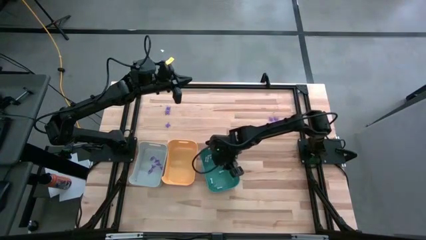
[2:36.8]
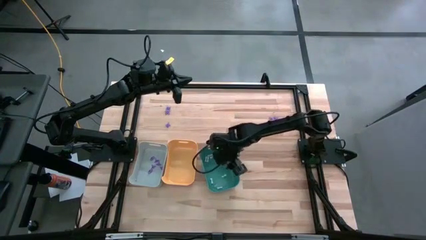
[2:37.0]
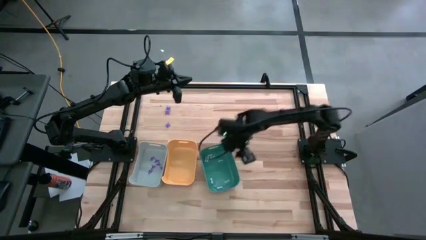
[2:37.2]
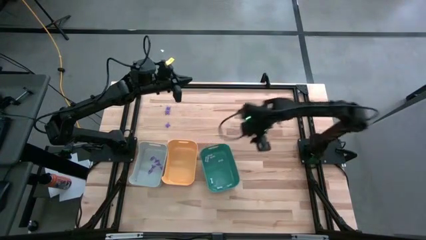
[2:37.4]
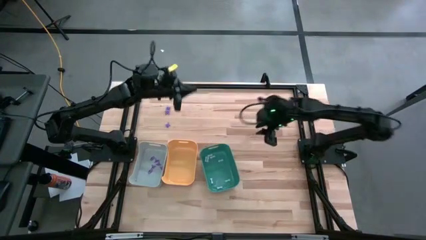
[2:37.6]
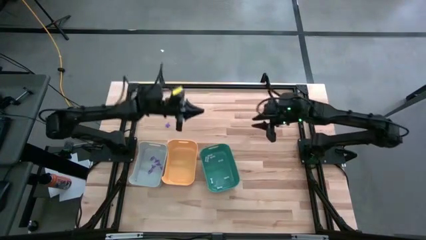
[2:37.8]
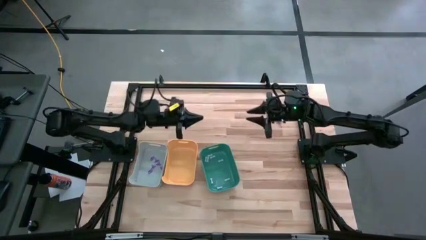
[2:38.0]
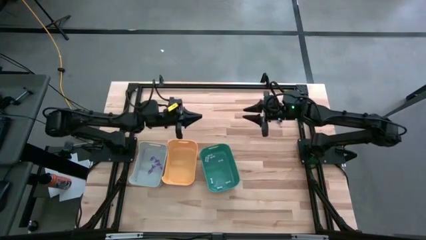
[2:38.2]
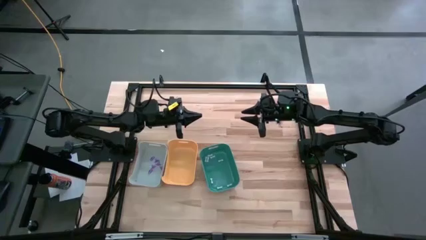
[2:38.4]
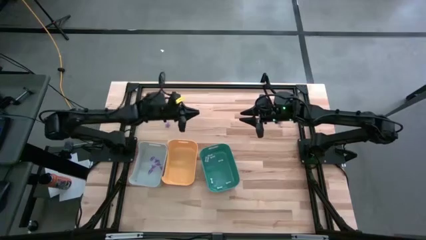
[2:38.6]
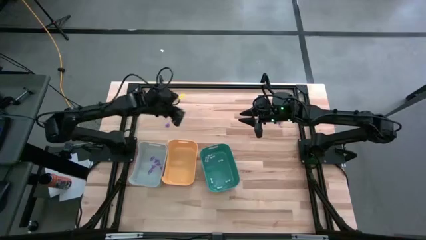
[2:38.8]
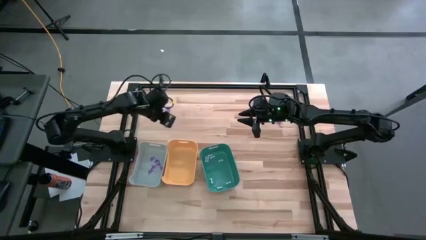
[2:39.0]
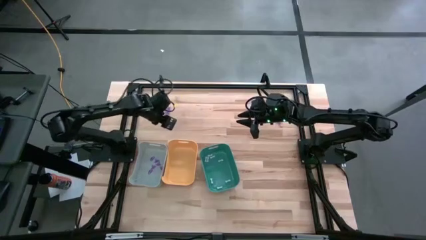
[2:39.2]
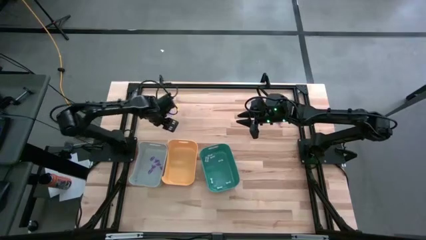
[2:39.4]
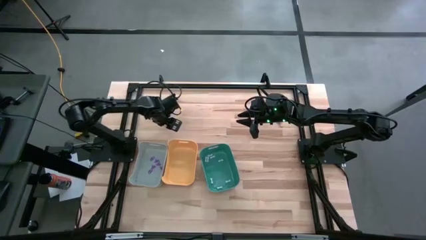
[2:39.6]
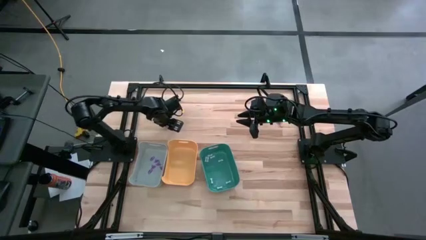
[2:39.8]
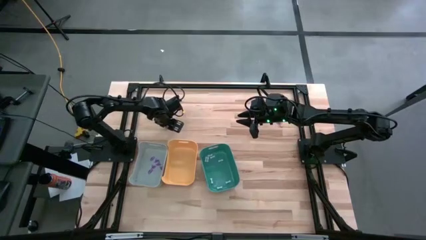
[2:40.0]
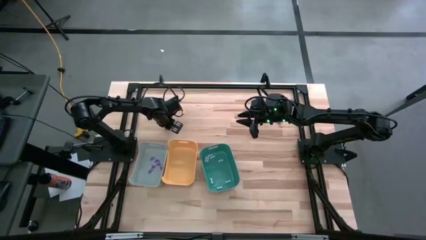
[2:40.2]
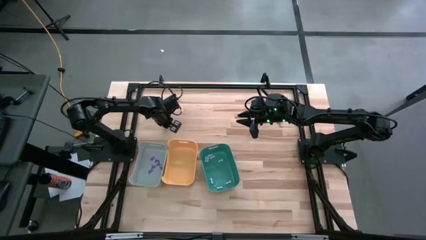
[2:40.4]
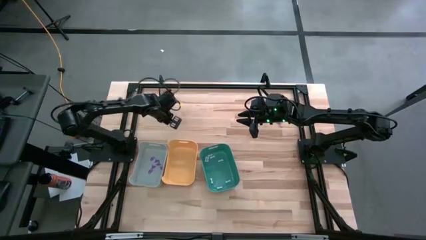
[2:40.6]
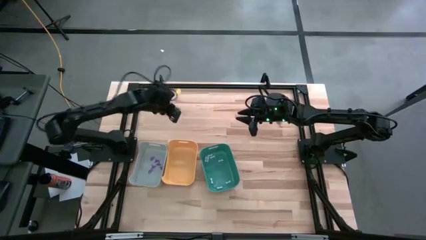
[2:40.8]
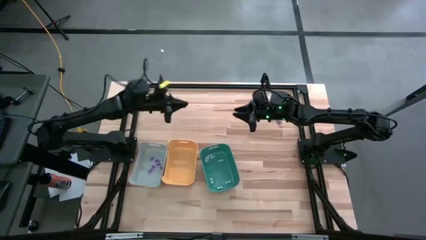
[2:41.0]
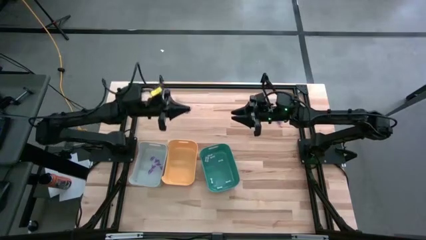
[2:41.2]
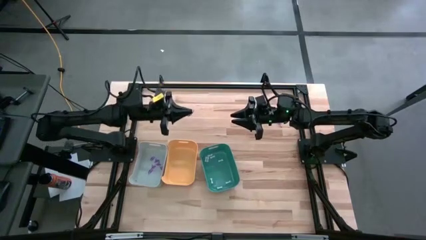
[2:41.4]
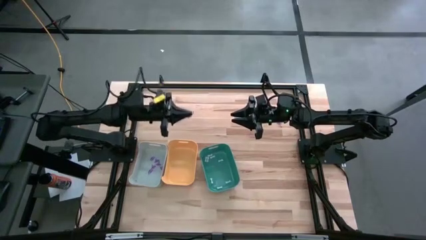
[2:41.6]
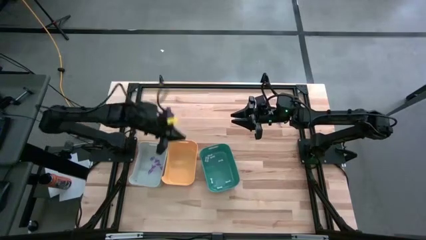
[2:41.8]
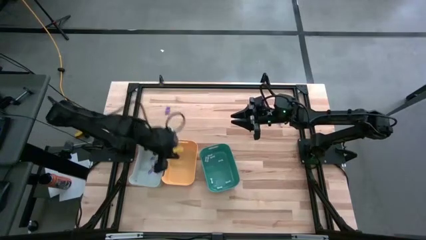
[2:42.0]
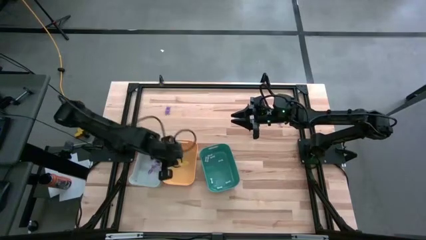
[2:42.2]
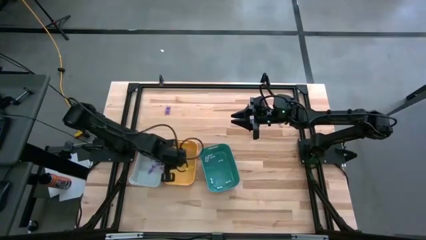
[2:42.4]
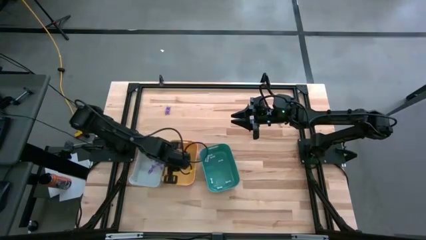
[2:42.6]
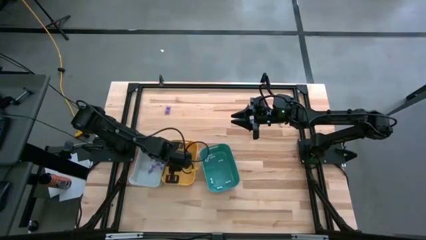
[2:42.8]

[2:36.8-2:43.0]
Task: Sort Halloween decoration
Put the purple spider toy into the yellow bin

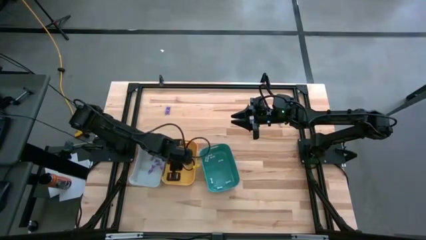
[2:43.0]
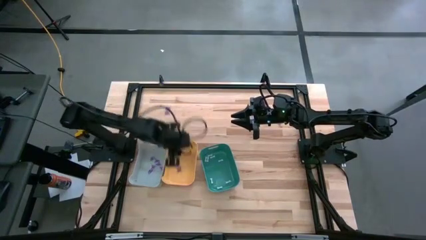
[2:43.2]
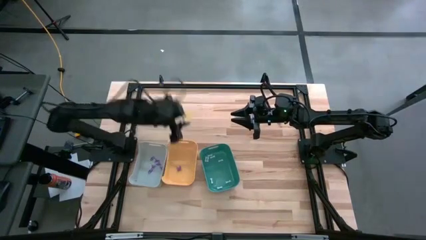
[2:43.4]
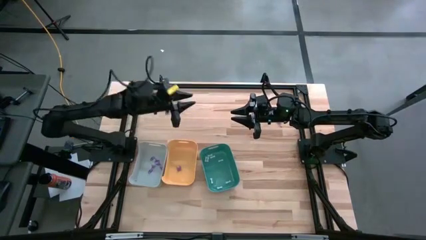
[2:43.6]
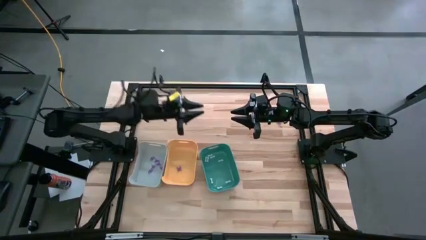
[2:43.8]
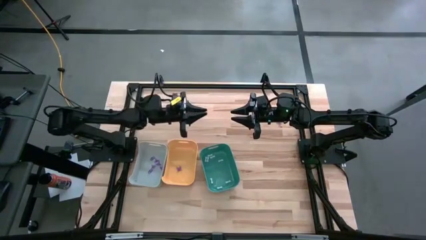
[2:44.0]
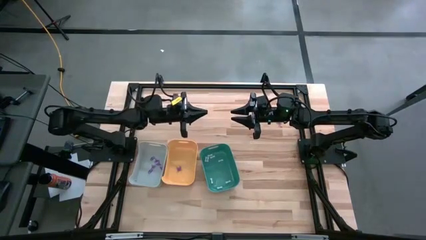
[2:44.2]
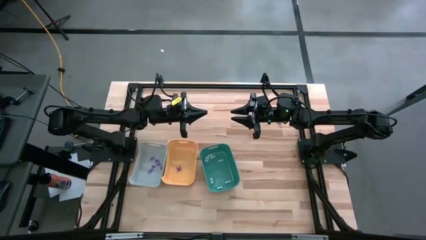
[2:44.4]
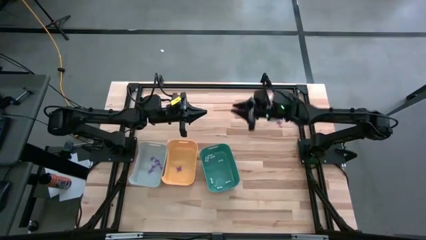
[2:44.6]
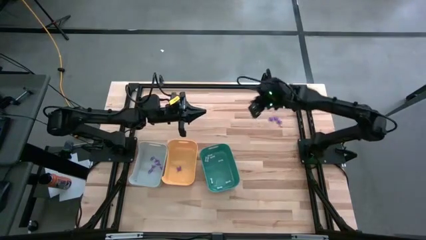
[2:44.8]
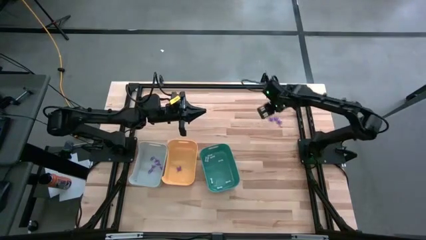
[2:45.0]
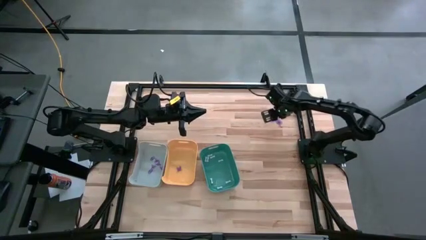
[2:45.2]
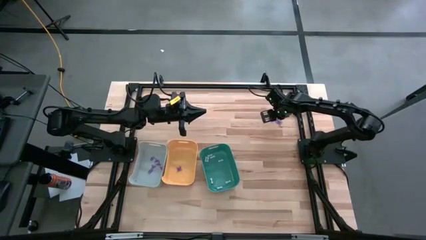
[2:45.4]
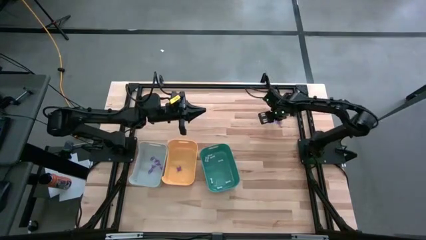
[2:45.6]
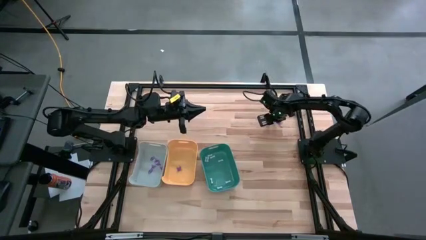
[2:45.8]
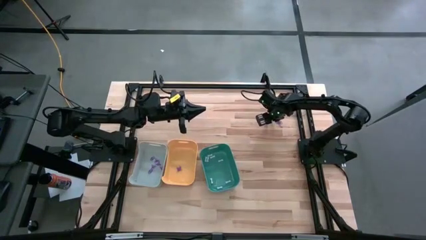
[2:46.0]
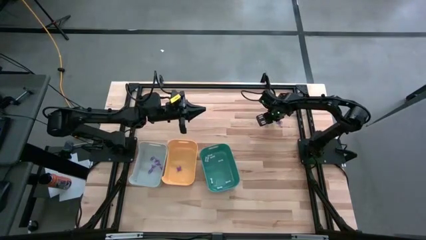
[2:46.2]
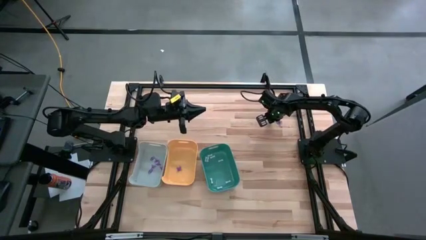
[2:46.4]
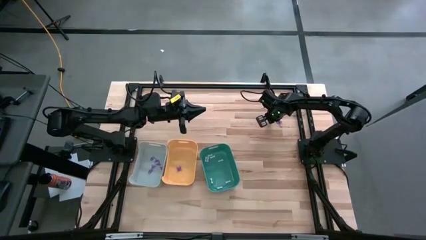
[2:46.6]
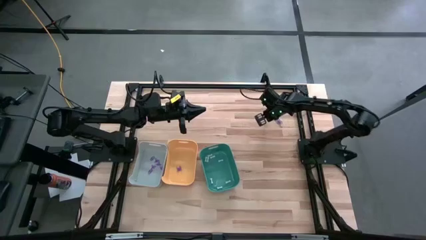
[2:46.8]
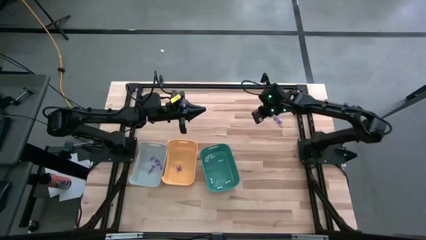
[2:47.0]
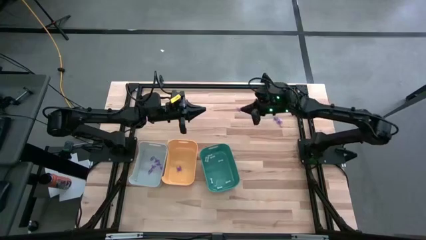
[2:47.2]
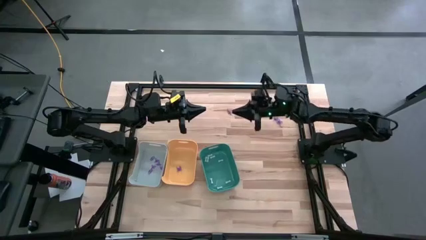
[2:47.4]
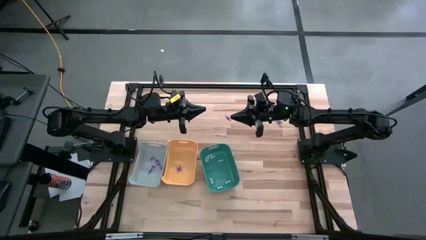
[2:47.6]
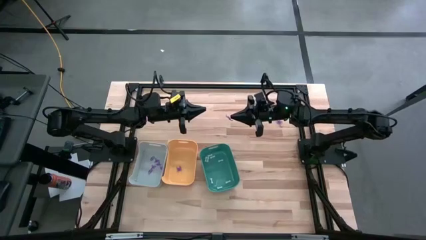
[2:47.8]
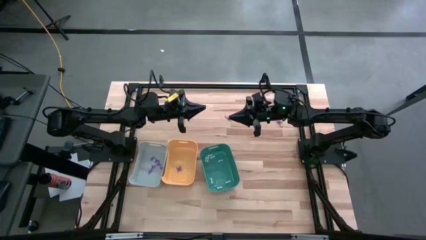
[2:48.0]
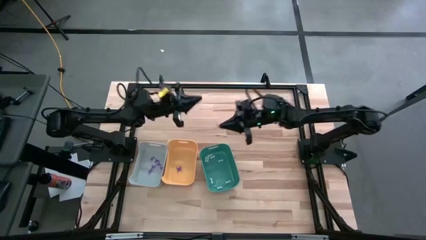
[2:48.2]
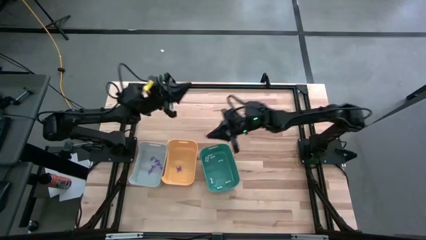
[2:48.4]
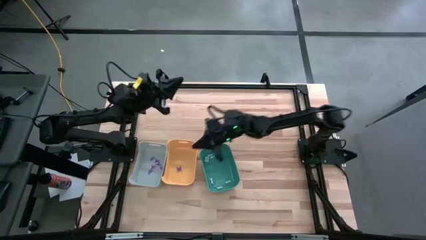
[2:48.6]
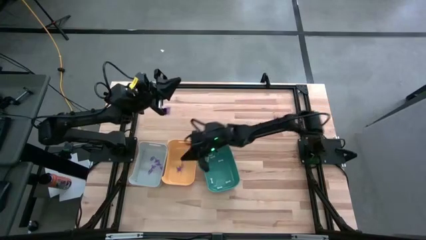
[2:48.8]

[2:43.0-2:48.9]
Put the purple spider toy into the yellow bin

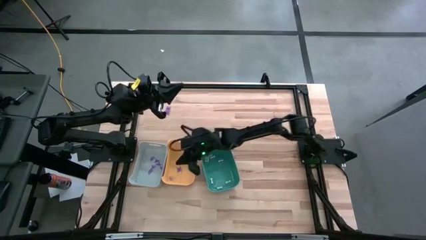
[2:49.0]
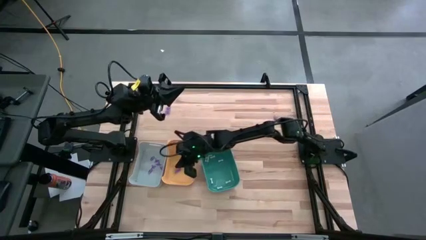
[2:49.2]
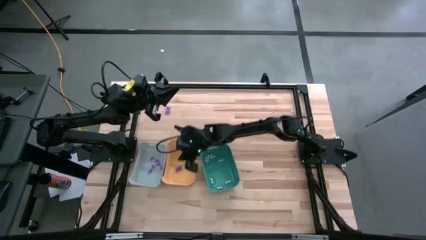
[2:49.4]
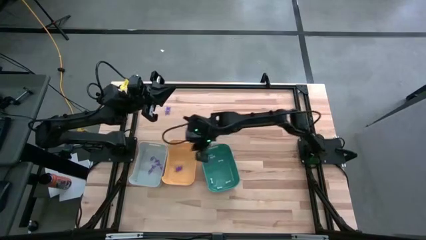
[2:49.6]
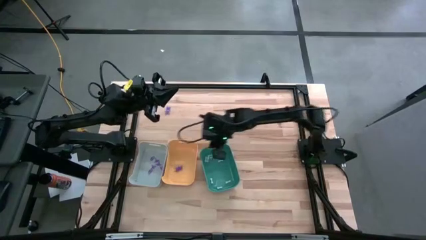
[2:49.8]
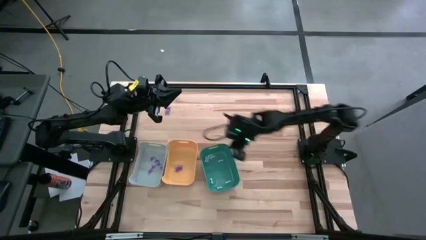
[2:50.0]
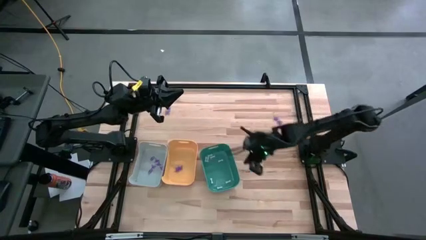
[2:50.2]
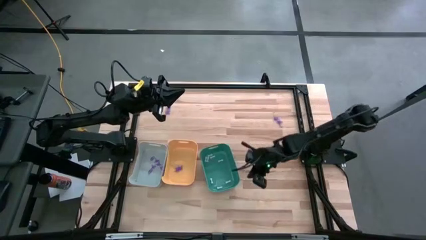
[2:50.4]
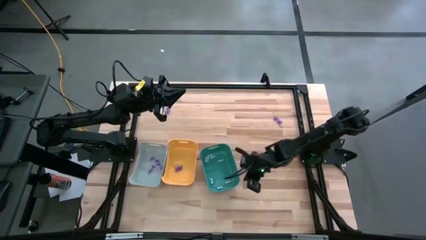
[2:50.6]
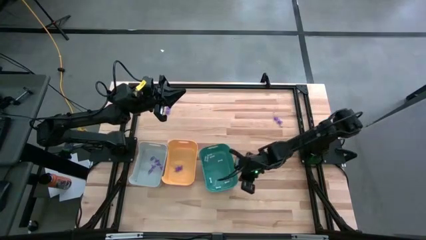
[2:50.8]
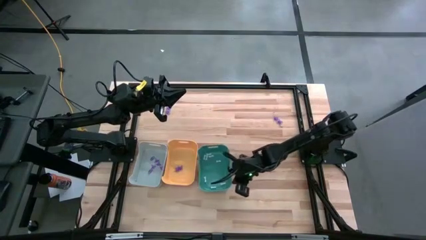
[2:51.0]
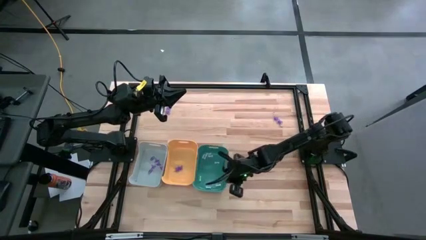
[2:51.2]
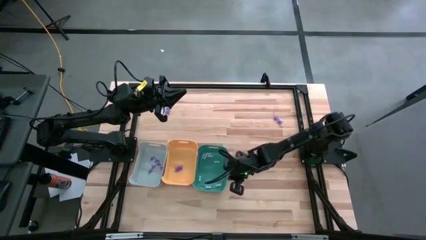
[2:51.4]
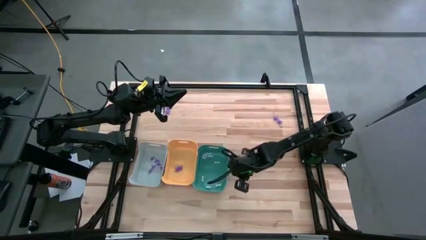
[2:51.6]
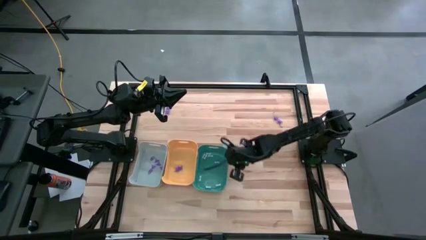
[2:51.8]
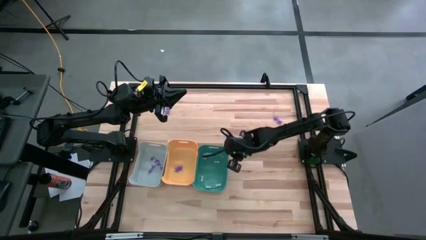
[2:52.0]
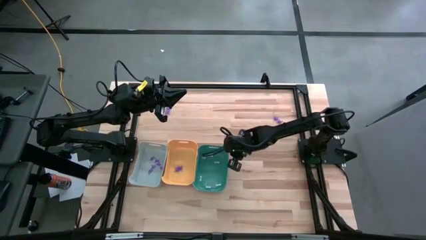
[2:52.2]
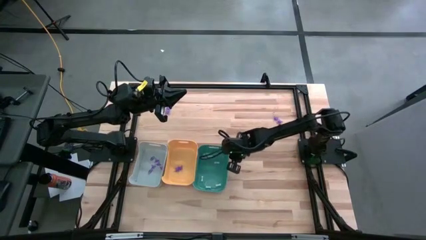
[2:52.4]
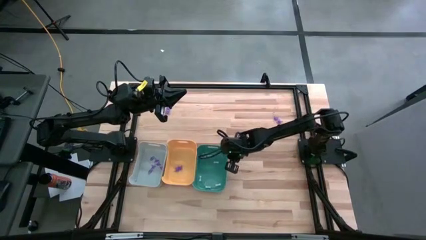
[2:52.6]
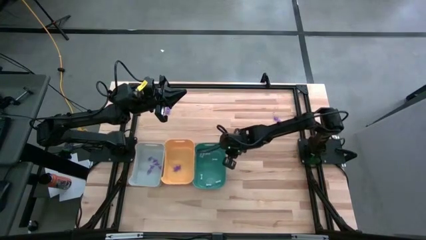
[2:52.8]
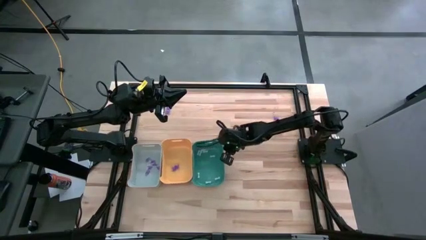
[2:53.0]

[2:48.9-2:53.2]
Adjust the green bin

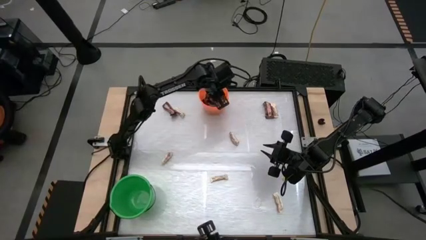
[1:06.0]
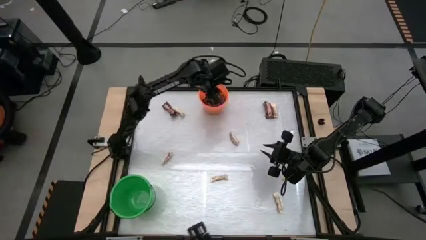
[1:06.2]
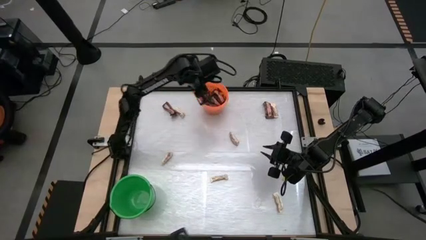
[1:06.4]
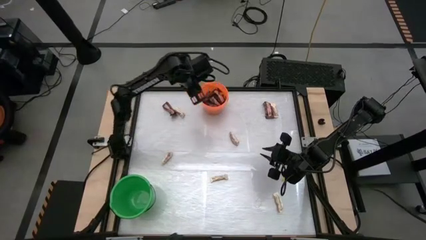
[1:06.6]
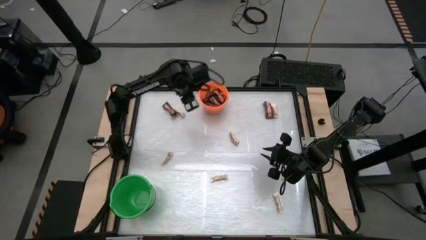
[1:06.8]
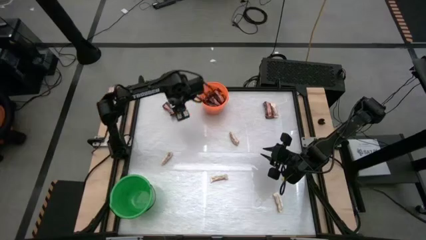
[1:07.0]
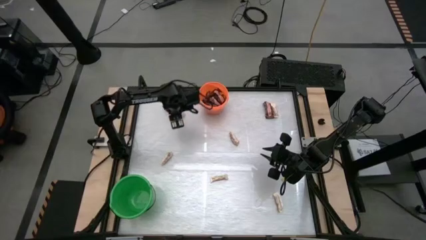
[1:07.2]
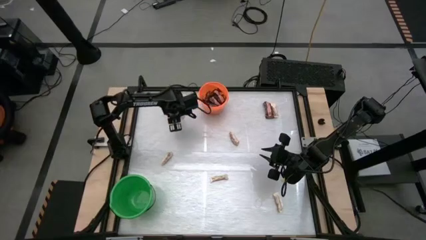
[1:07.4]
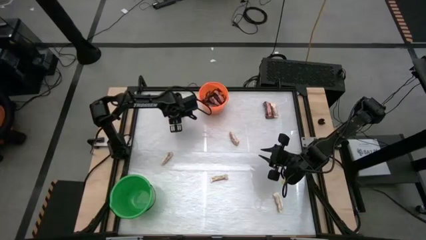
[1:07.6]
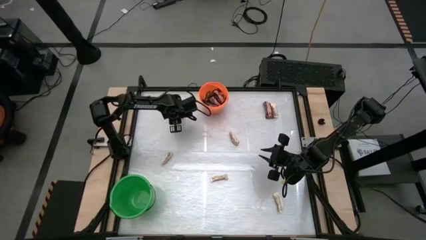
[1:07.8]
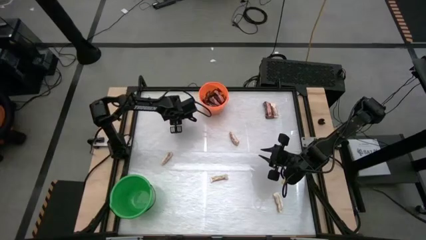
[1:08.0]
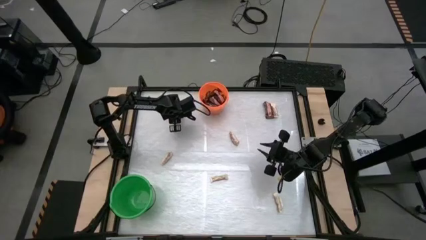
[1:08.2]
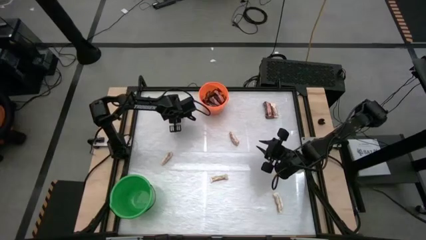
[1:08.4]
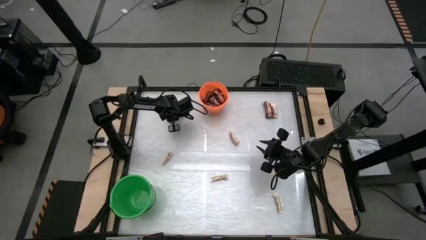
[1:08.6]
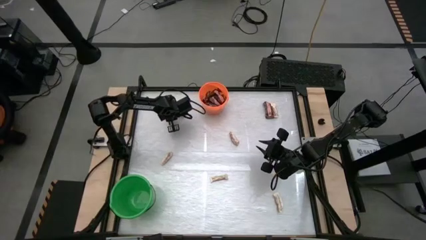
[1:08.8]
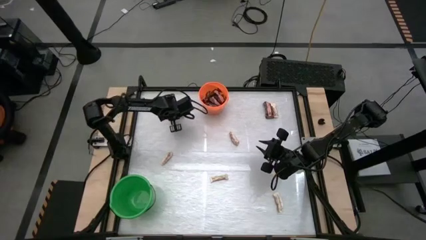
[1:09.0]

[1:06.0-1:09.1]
Task: Sort candy by brand, put in halloween buckets
Put the brown chocolate bar into the orange bucket
